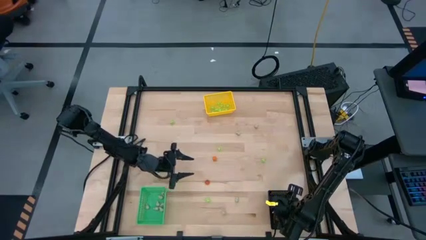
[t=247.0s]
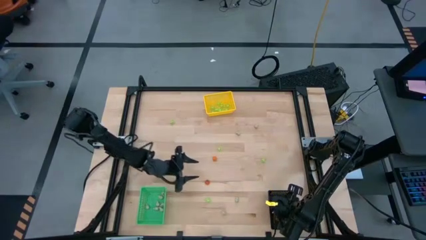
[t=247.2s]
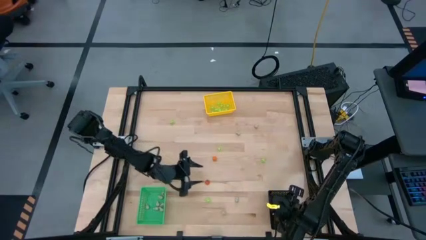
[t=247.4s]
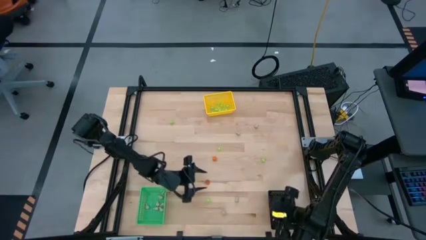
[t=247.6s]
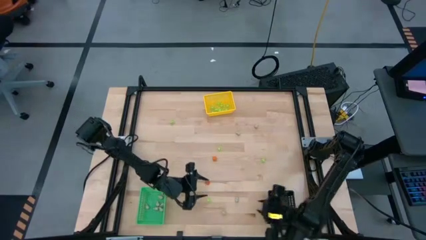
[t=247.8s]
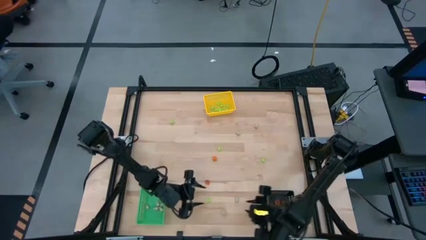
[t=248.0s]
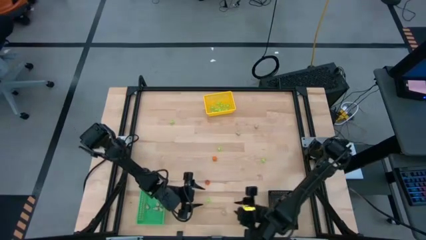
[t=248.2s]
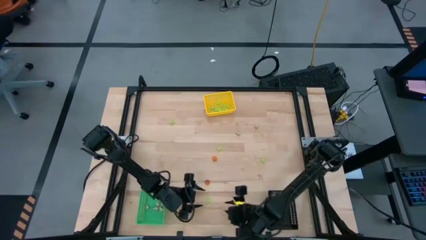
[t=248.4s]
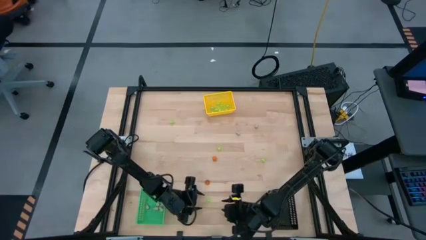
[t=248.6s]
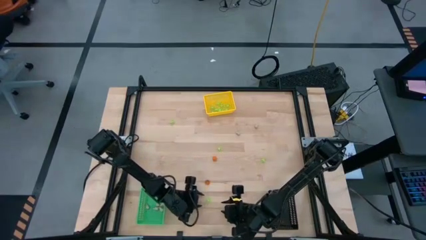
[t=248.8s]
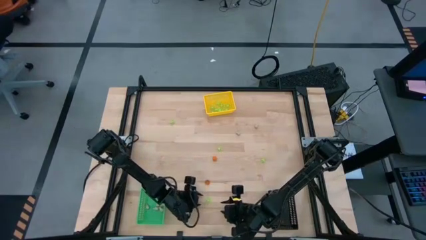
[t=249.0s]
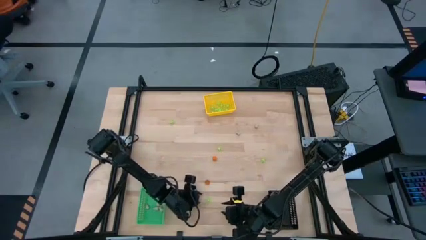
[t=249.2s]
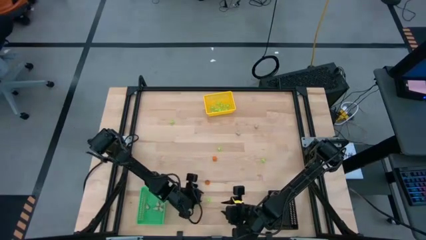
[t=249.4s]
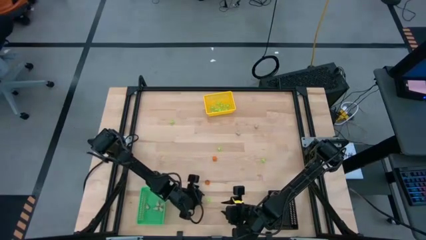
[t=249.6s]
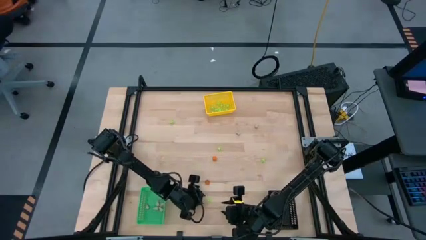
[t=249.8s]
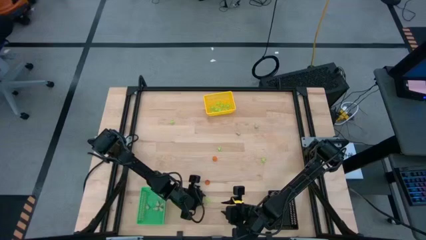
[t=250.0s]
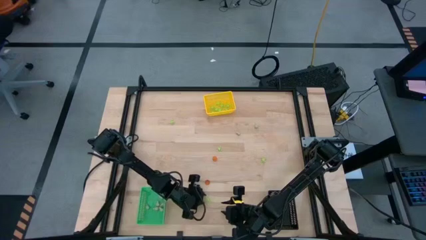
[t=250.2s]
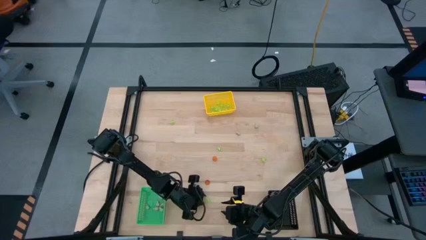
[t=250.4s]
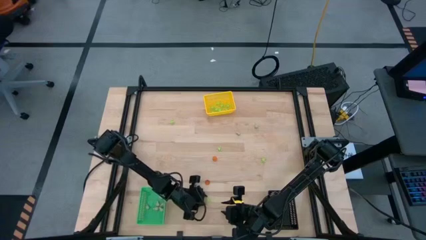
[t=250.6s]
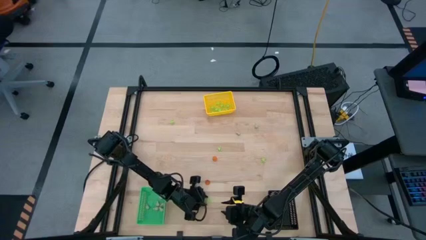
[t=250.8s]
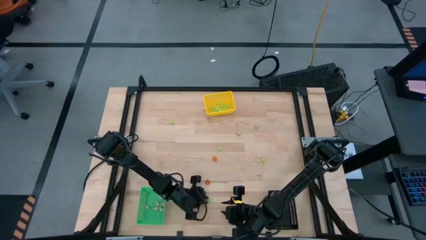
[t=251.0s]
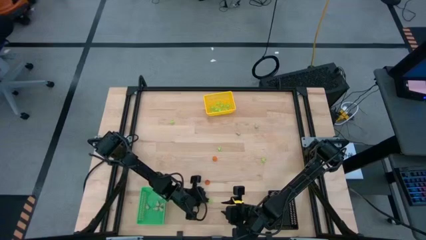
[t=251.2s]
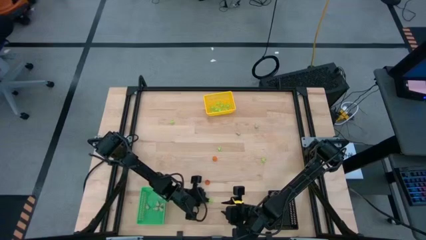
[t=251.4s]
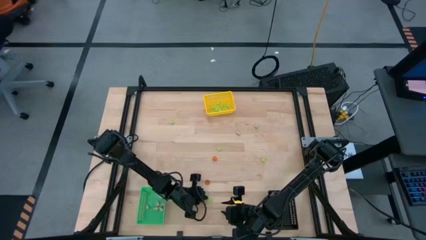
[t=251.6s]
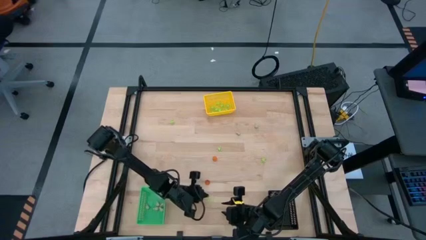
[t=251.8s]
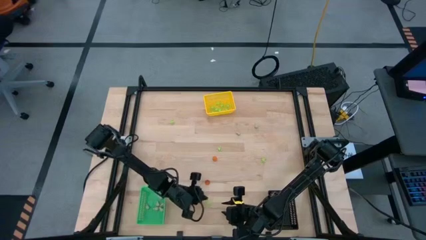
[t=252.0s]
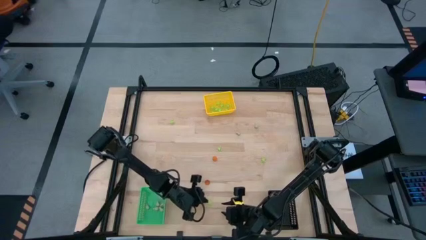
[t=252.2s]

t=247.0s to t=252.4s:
Task: Sort Halloween decoration
Put the green spider toy into the yellow bin

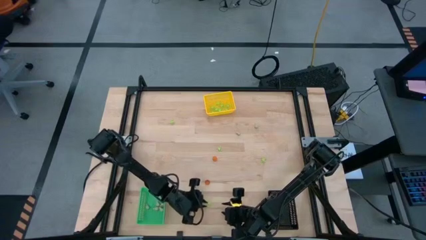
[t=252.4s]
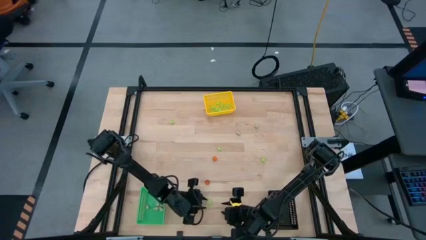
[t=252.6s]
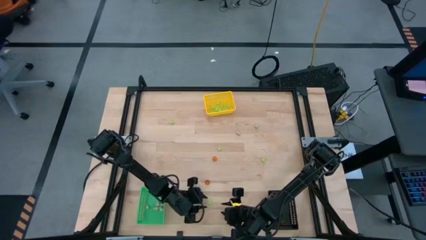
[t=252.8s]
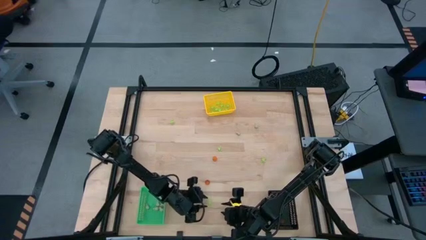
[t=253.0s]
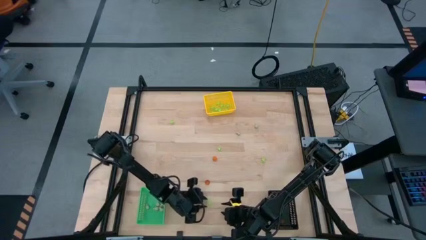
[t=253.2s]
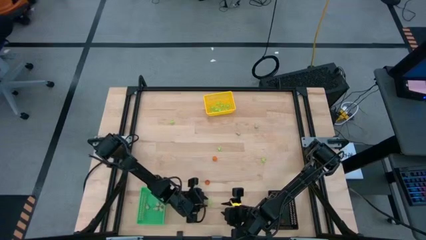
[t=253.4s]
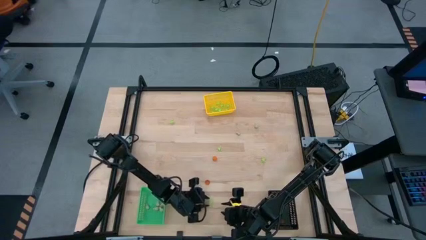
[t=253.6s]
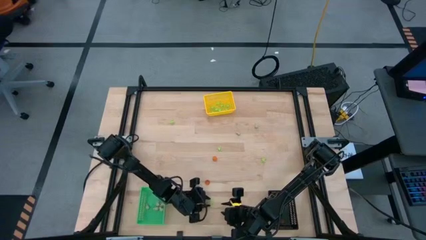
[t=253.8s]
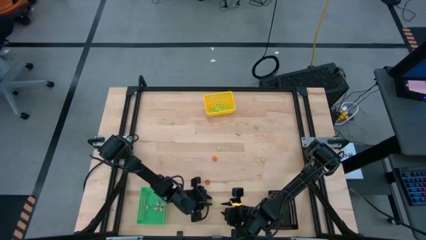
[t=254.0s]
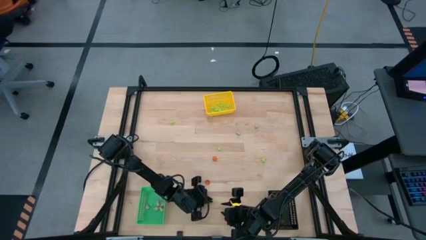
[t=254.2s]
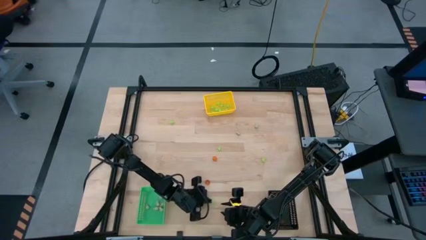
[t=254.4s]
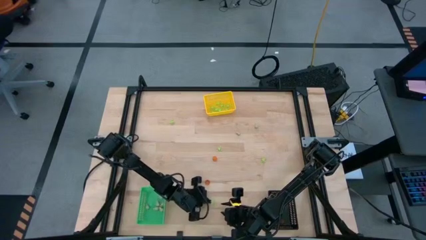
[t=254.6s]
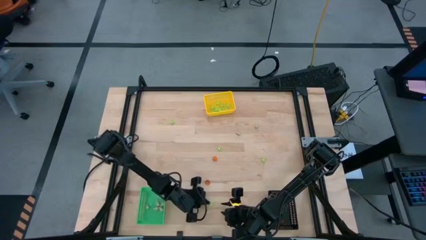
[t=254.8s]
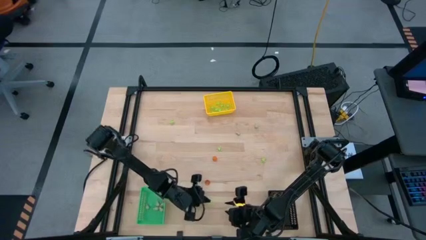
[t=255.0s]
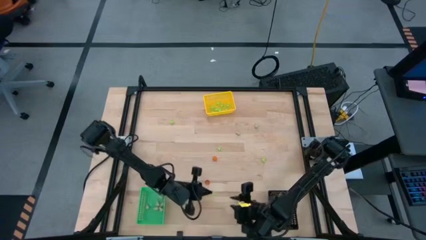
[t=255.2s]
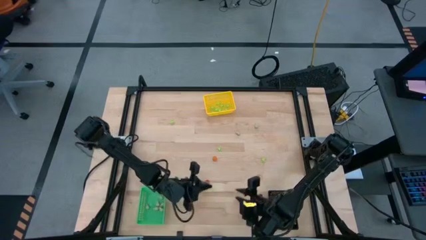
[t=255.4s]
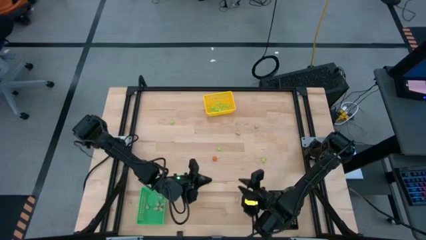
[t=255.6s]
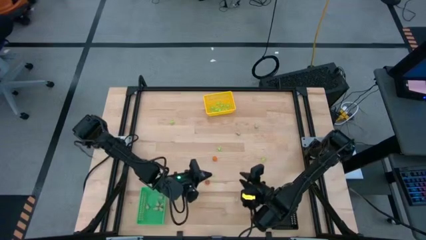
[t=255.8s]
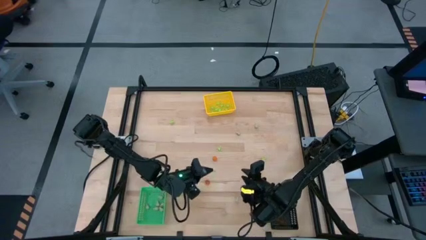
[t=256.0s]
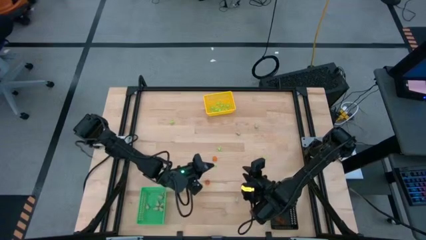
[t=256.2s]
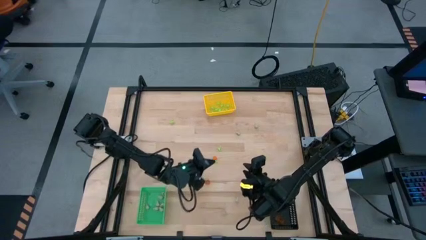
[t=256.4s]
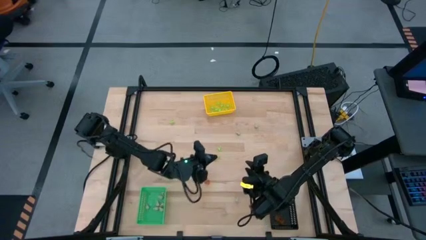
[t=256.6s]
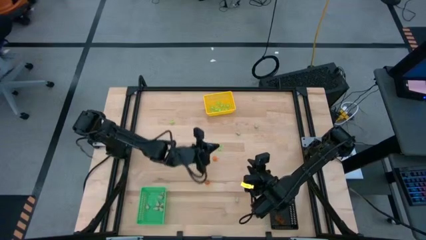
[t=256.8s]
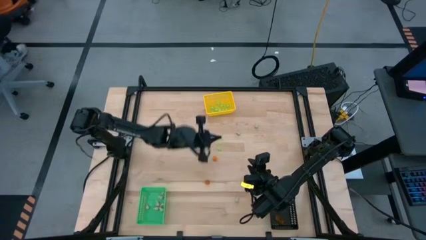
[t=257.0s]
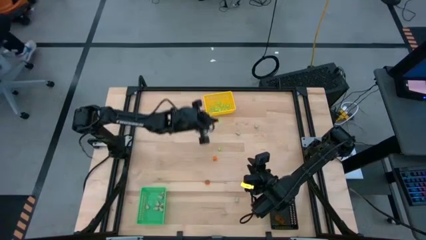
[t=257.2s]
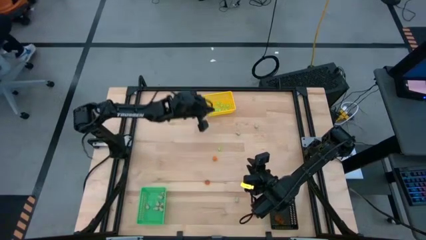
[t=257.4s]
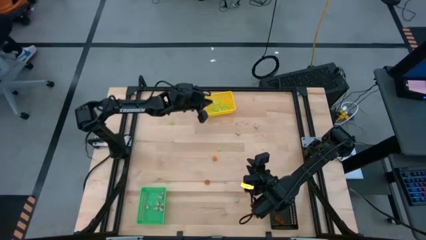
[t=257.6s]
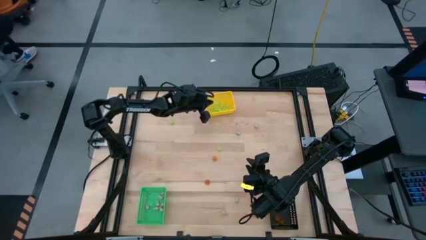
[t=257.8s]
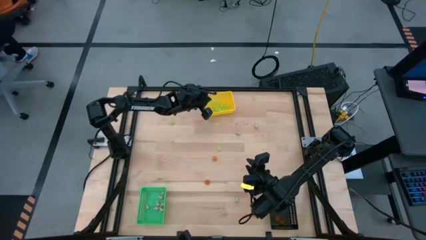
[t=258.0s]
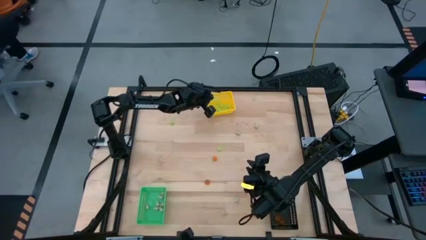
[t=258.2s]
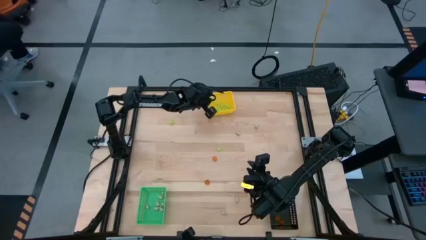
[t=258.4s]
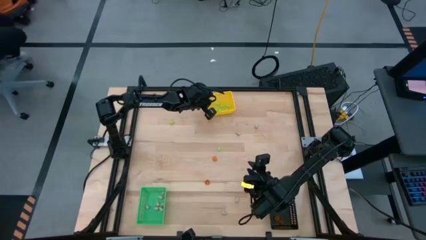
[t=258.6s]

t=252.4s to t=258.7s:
Put the green spider toy into the yellow bin
